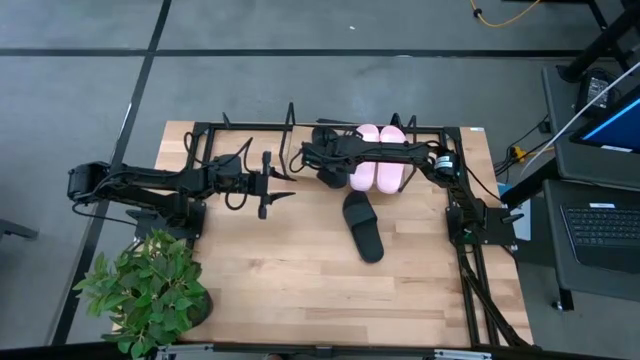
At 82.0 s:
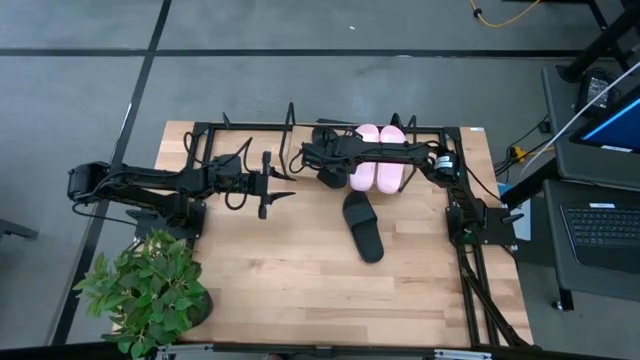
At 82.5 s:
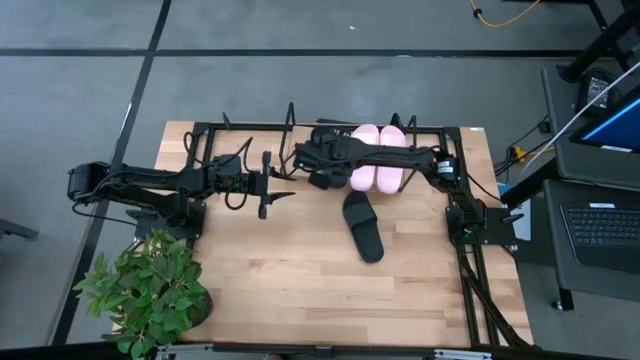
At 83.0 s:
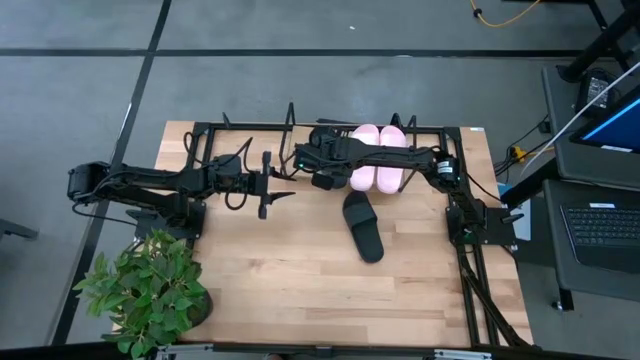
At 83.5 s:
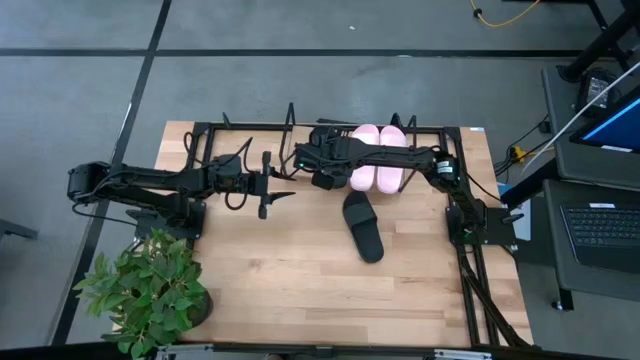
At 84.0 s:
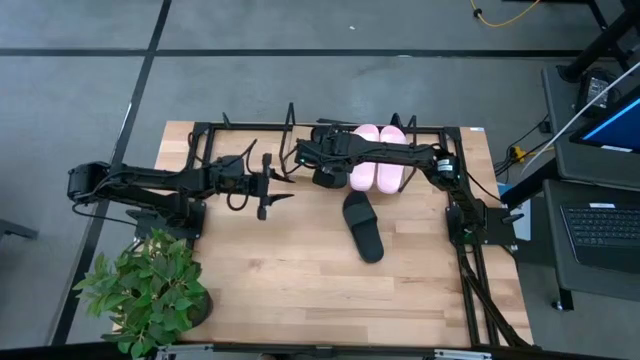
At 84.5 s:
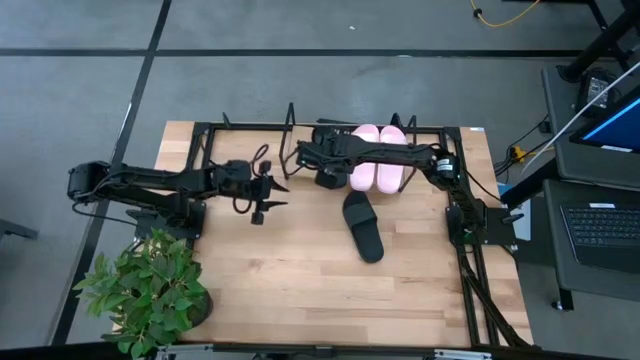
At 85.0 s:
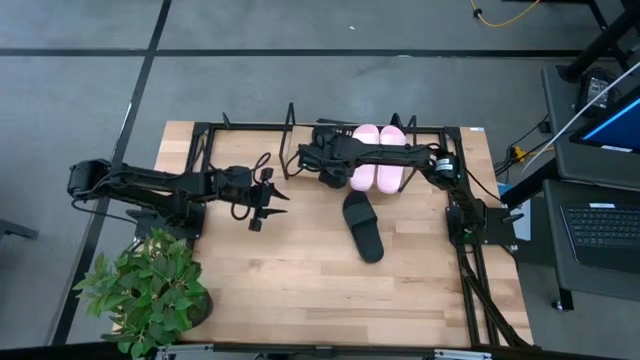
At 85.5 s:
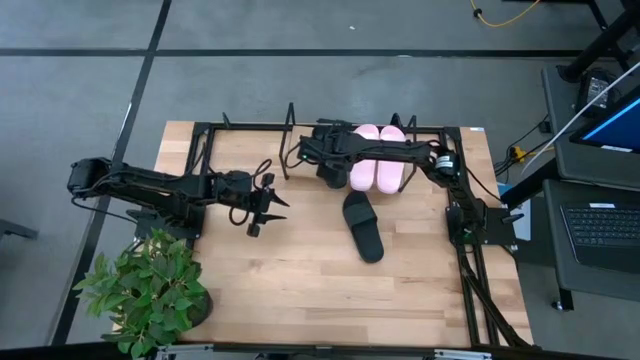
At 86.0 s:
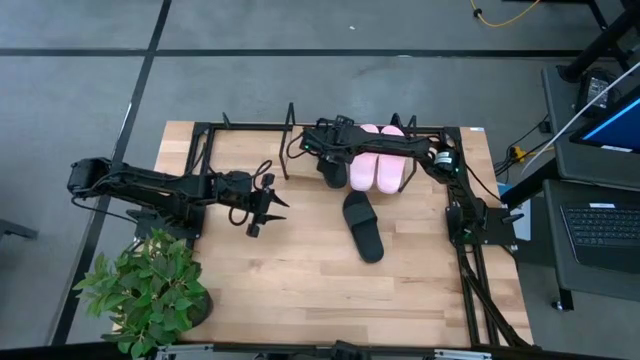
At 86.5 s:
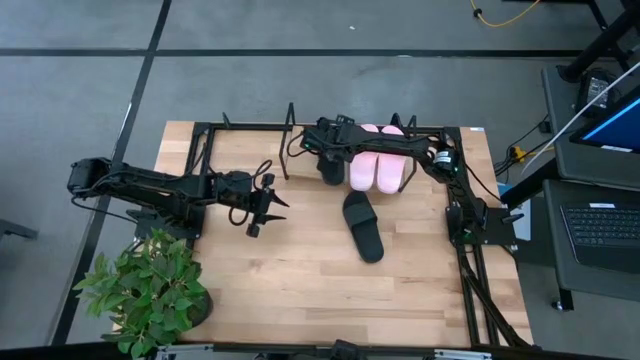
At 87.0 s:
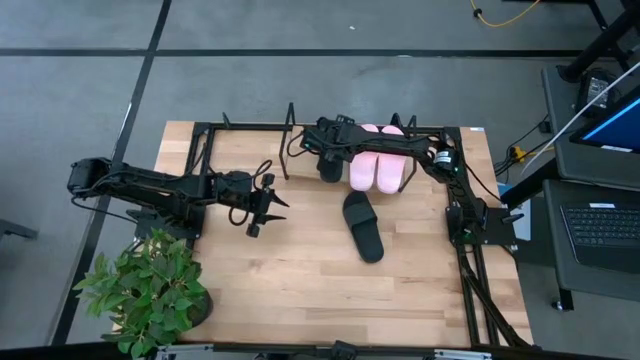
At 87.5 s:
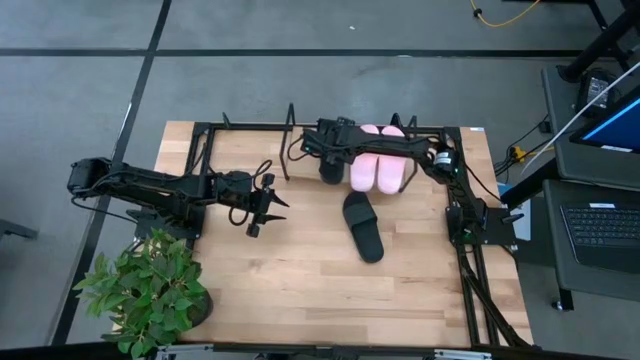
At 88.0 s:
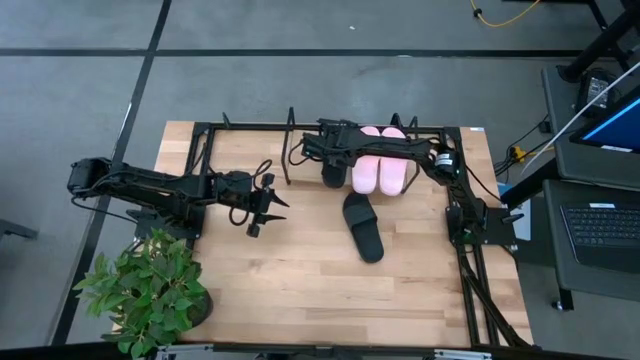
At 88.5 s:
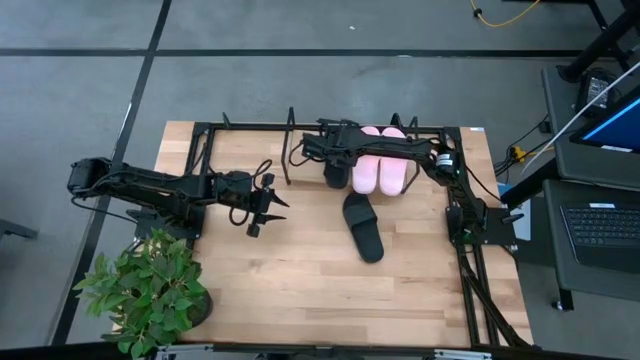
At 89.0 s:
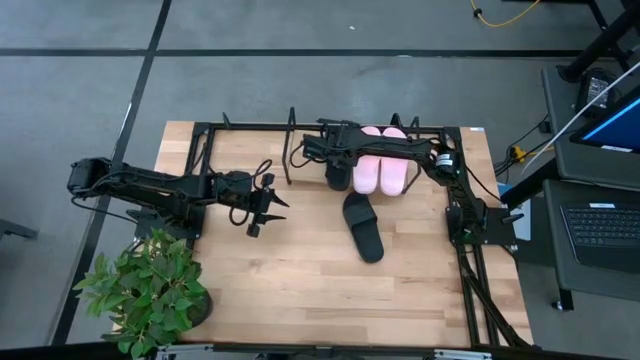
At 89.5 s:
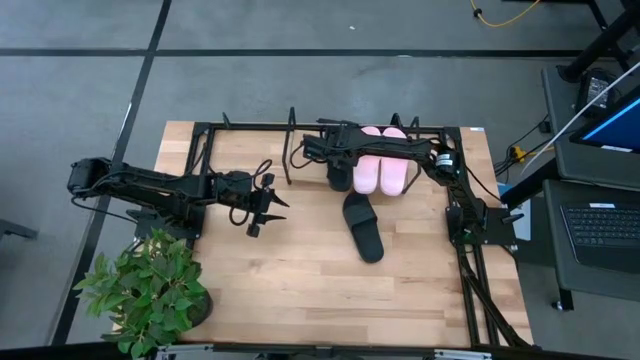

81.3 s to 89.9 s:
Task: Pick and place slides into the shelf
Adjust the black slide on the shelf

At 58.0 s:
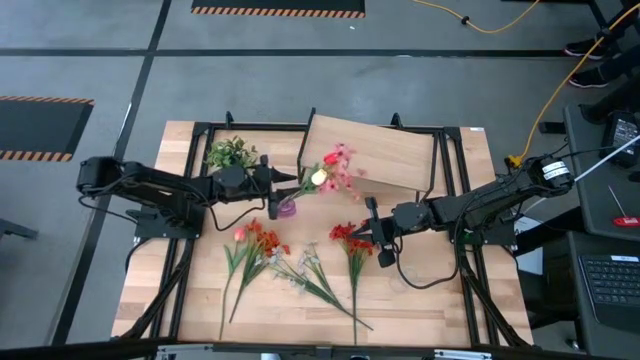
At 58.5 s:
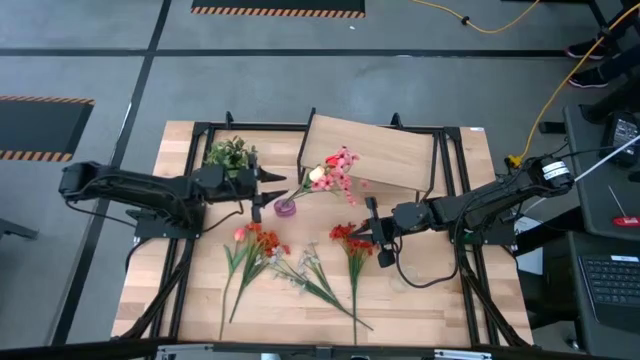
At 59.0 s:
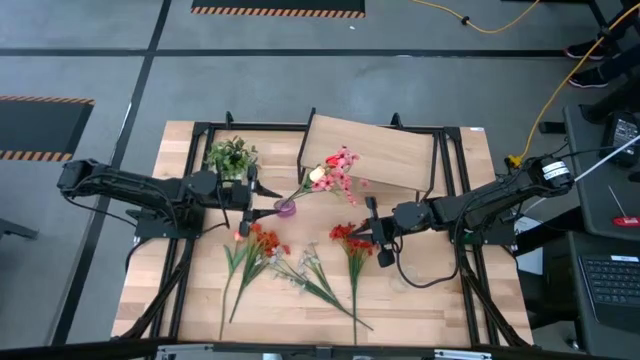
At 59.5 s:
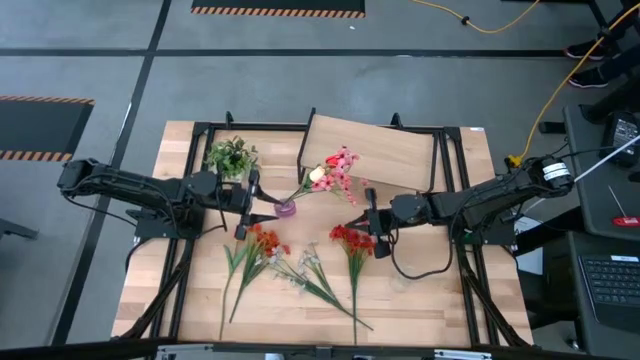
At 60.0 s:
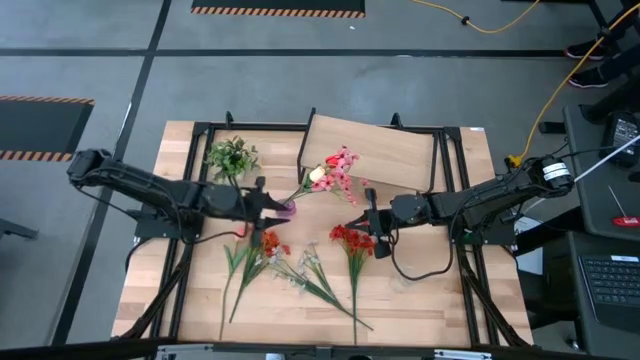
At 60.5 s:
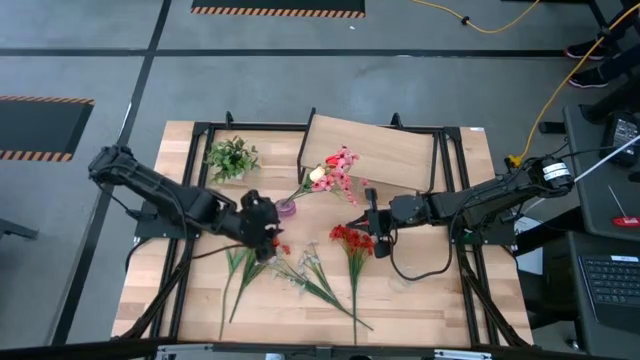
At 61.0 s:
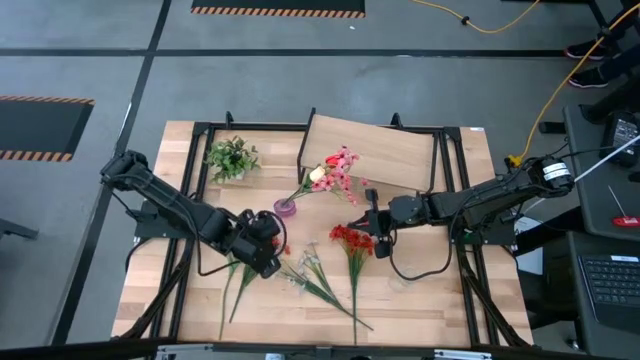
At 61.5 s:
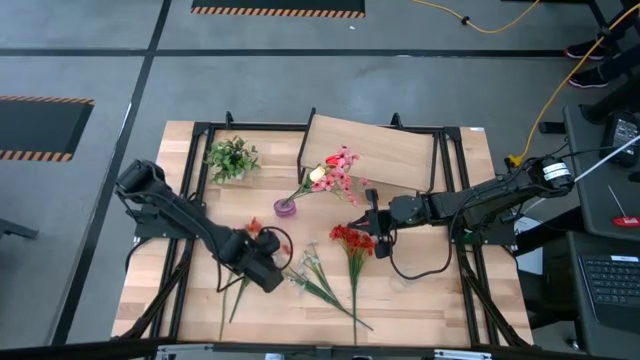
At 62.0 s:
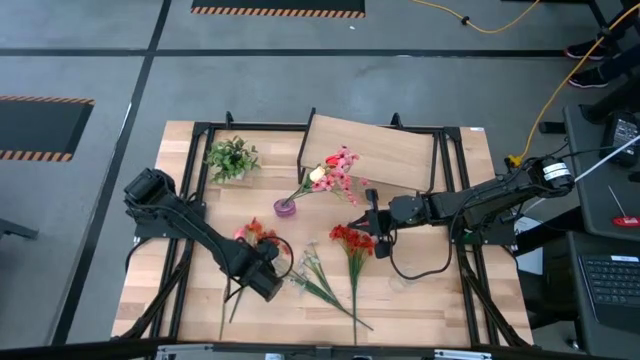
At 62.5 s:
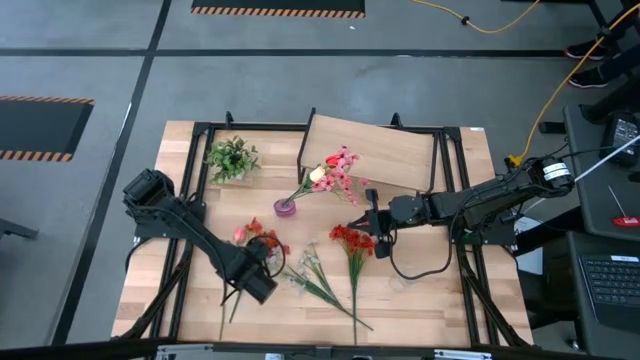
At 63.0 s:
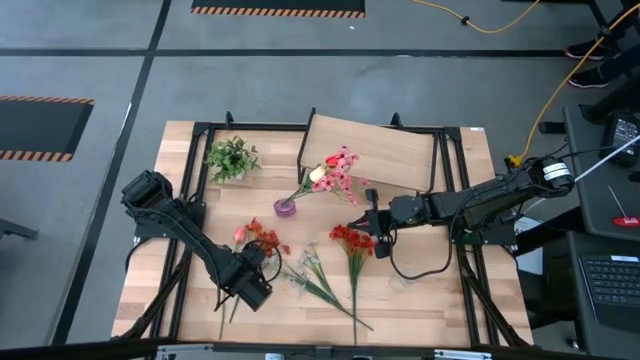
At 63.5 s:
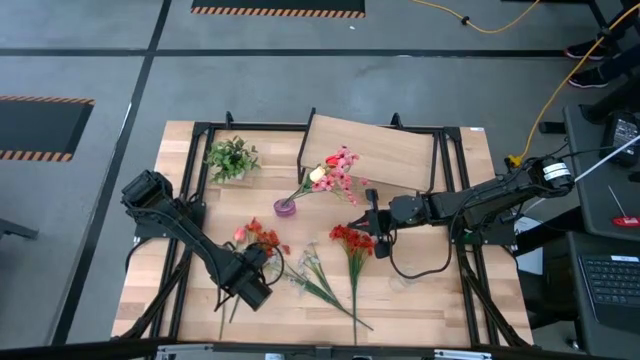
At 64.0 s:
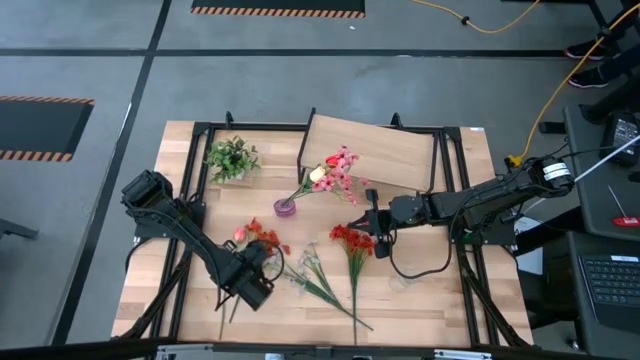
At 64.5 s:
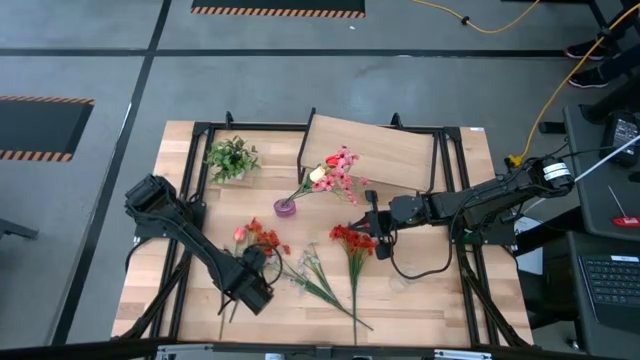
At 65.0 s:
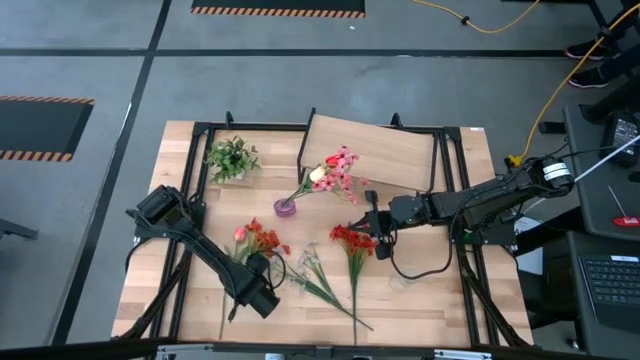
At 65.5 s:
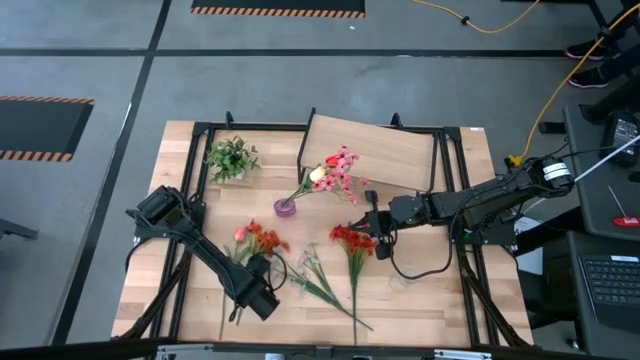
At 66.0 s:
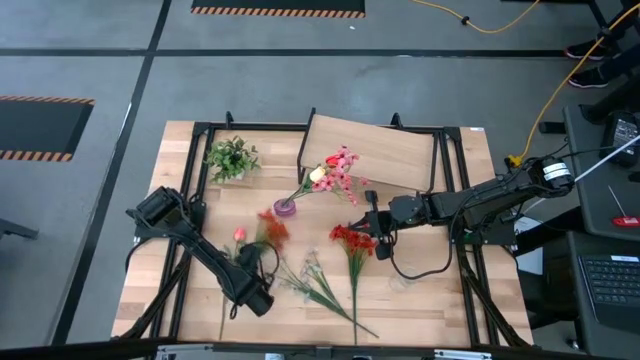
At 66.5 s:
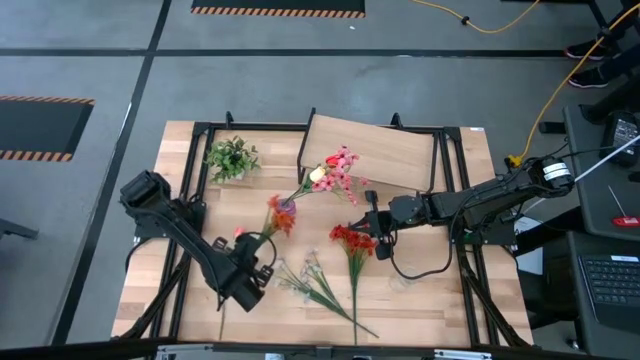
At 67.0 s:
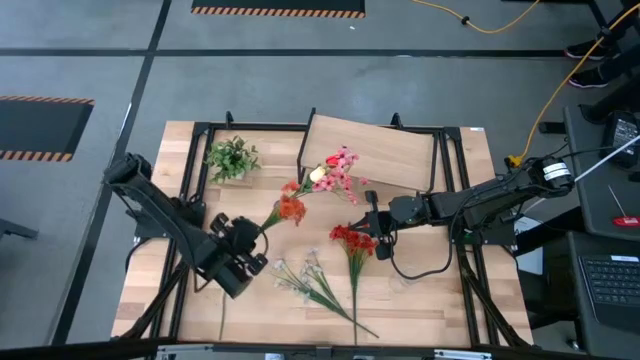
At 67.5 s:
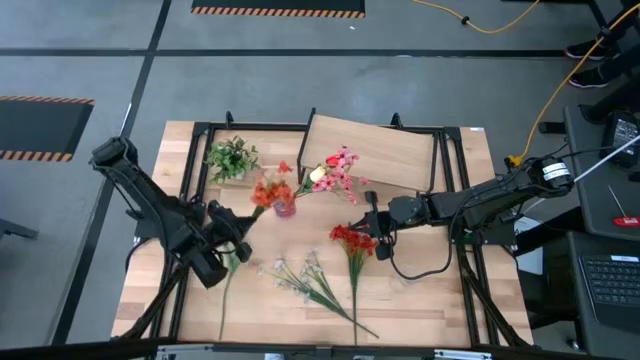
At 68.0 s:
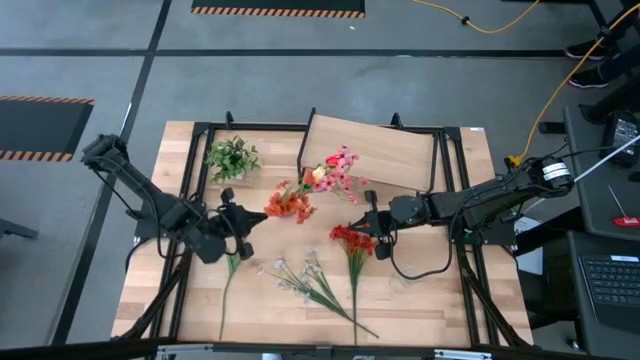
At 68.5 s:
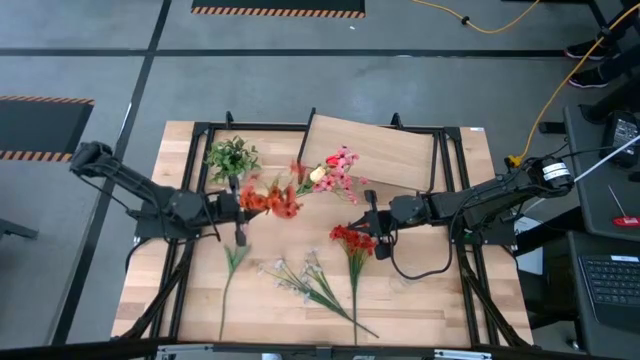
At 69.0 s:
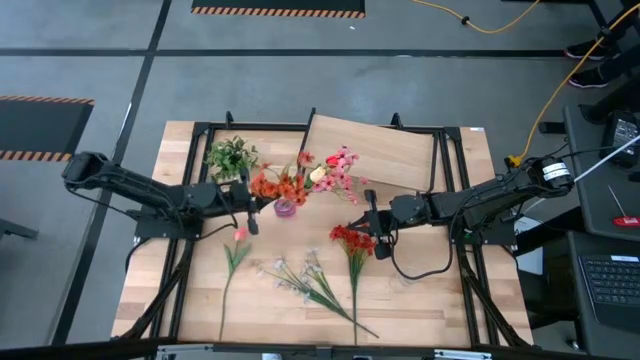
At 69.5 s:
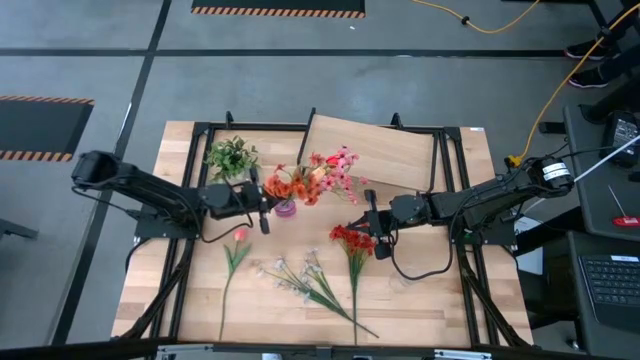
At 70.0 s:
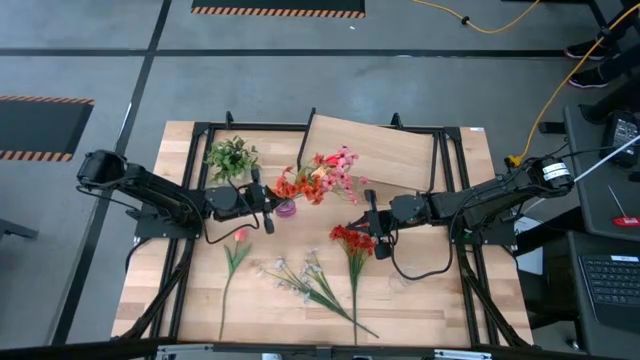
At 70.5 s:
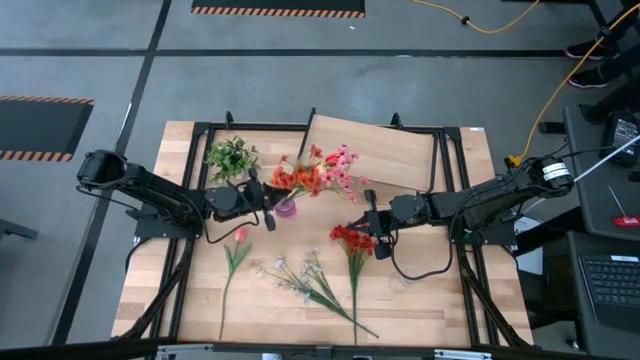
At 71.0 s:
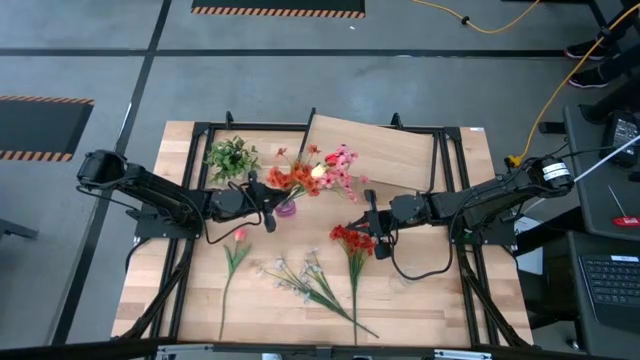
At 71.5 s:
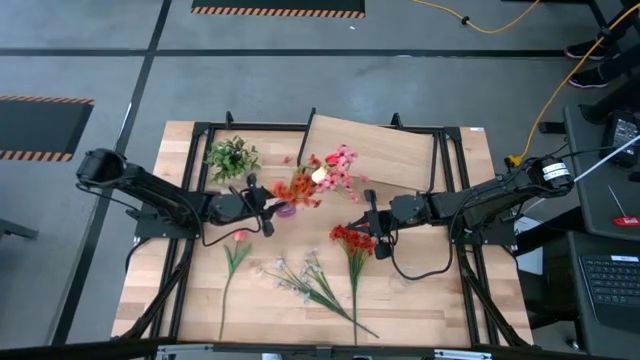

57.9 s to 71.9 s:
Task: Pick and place flowers into a vace then onto a shelf
Put the orange flowers into the purple vase
